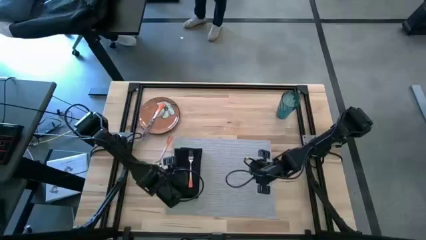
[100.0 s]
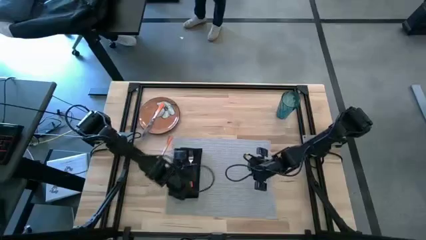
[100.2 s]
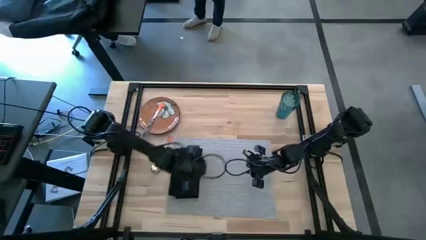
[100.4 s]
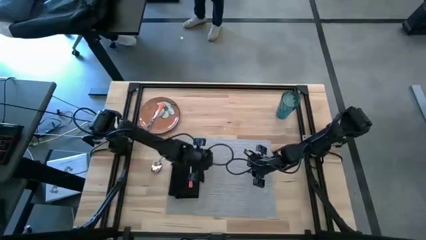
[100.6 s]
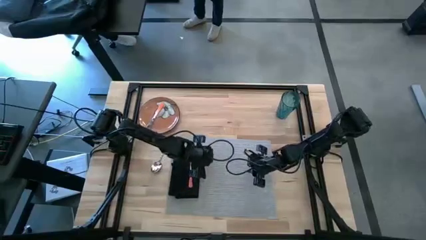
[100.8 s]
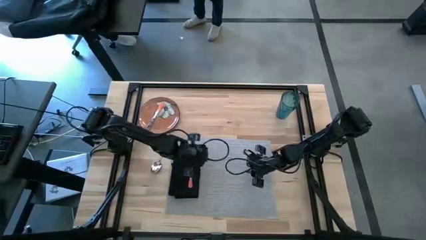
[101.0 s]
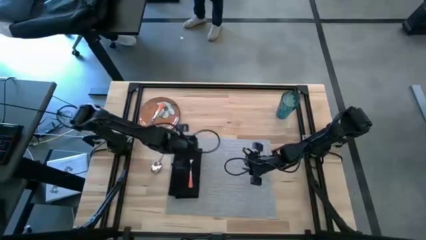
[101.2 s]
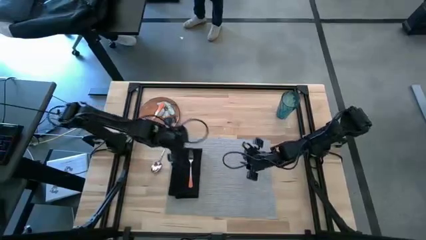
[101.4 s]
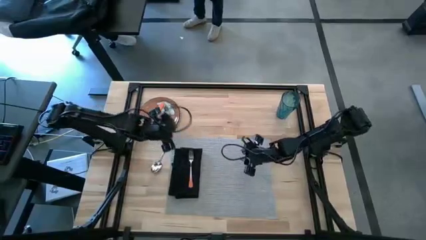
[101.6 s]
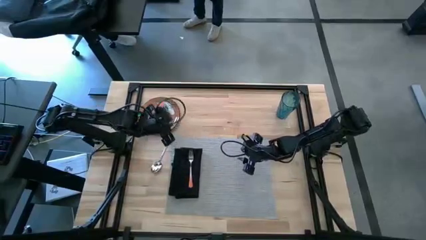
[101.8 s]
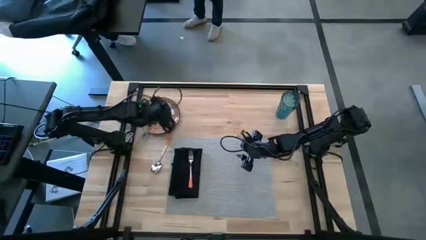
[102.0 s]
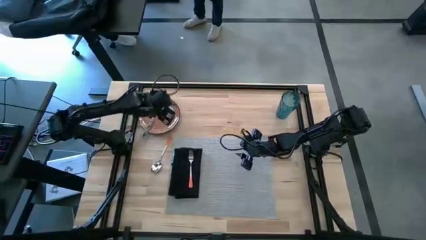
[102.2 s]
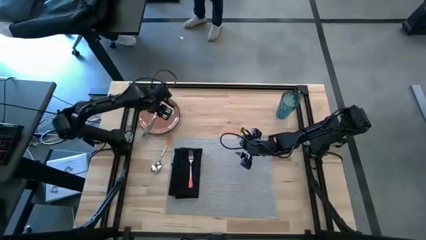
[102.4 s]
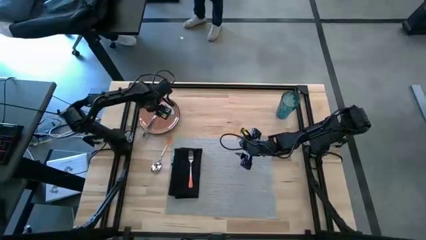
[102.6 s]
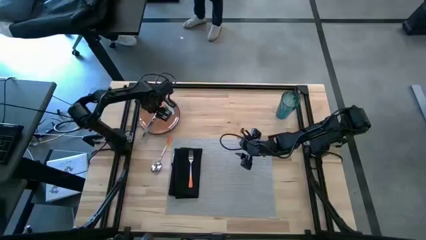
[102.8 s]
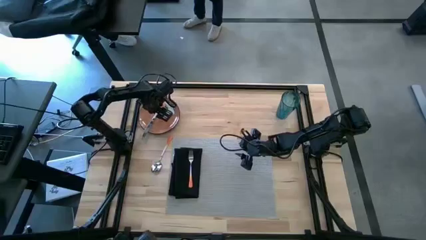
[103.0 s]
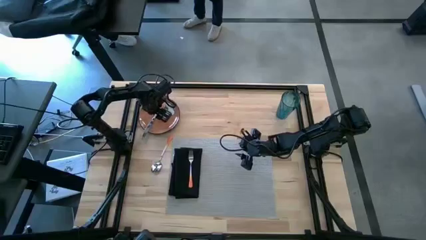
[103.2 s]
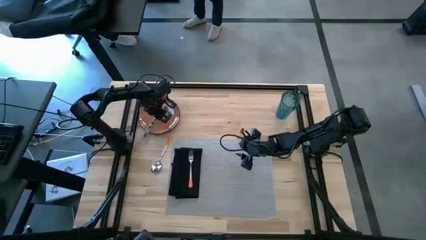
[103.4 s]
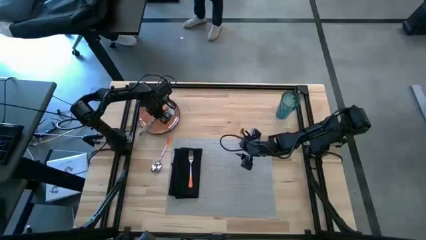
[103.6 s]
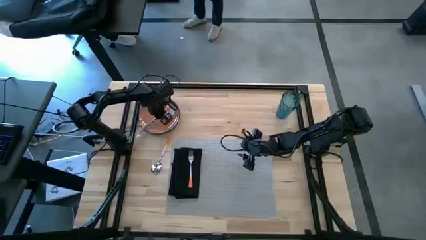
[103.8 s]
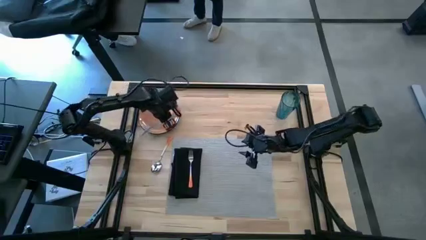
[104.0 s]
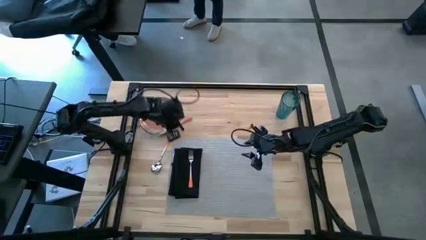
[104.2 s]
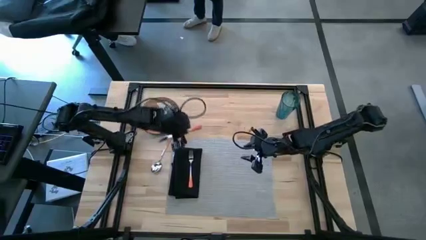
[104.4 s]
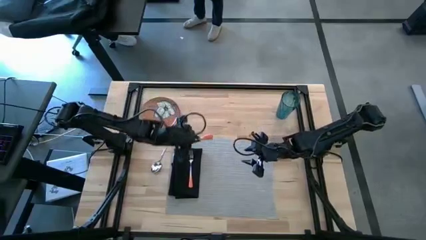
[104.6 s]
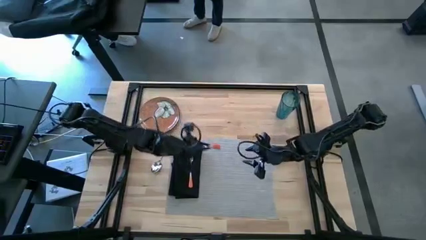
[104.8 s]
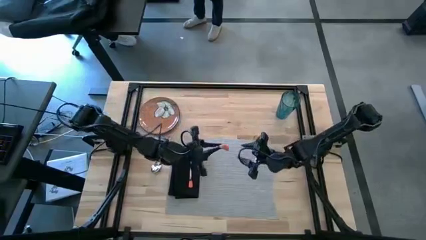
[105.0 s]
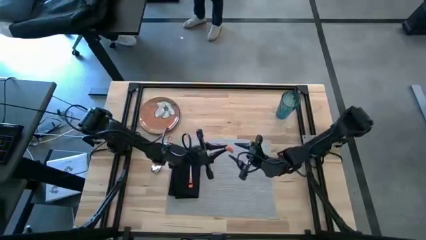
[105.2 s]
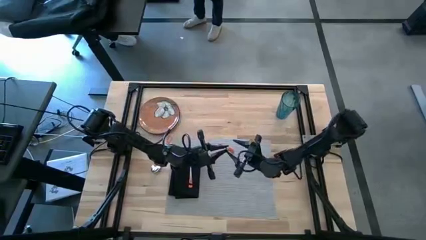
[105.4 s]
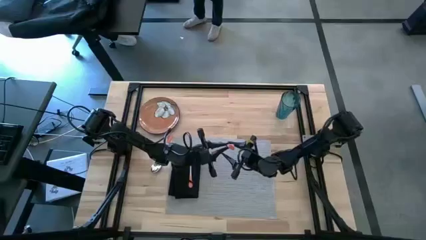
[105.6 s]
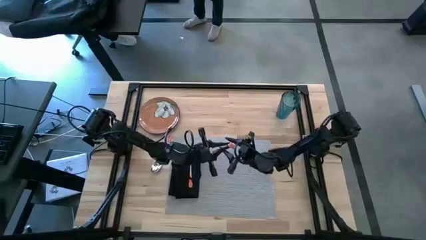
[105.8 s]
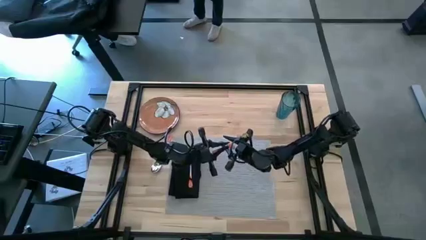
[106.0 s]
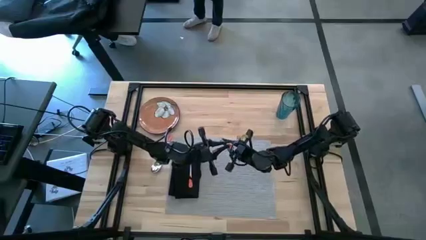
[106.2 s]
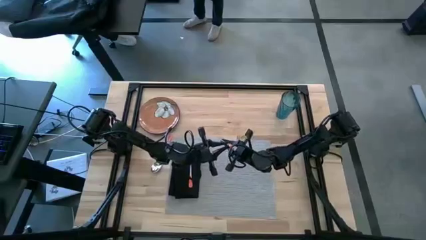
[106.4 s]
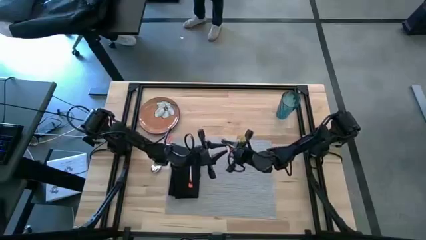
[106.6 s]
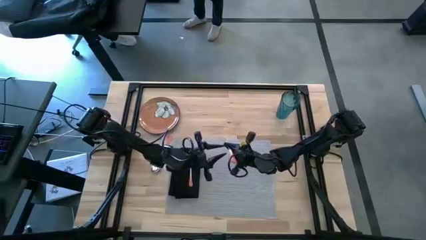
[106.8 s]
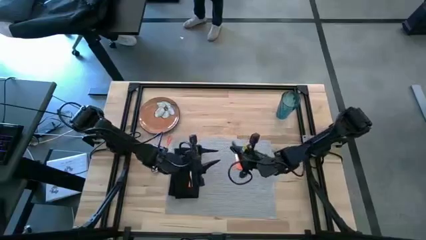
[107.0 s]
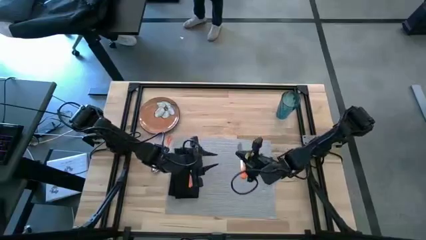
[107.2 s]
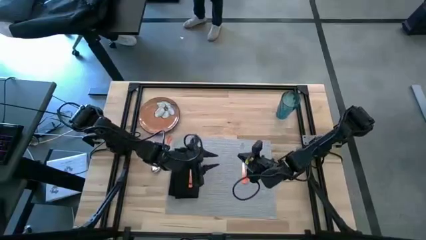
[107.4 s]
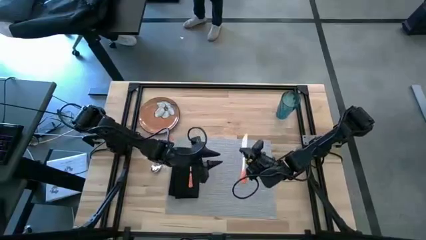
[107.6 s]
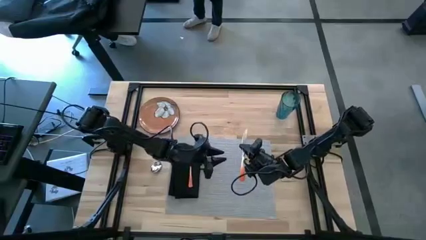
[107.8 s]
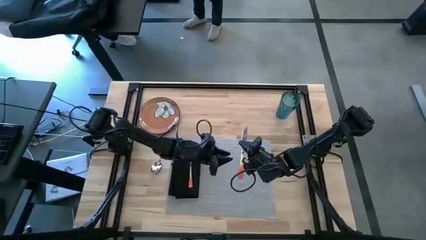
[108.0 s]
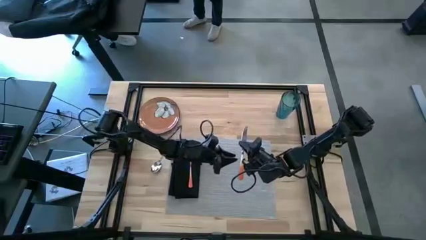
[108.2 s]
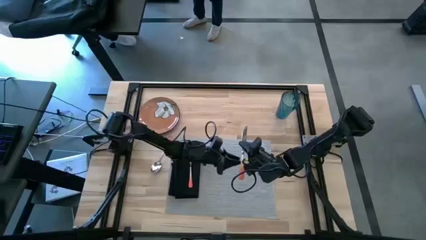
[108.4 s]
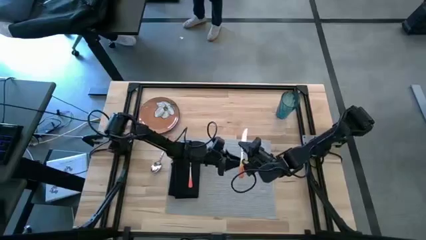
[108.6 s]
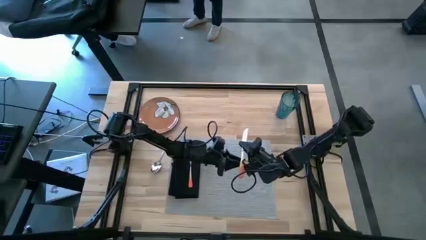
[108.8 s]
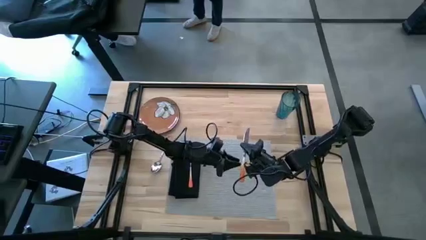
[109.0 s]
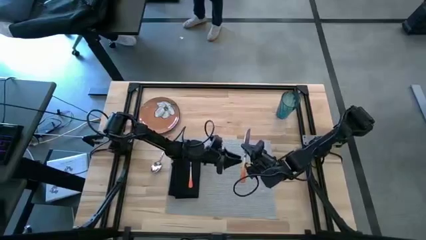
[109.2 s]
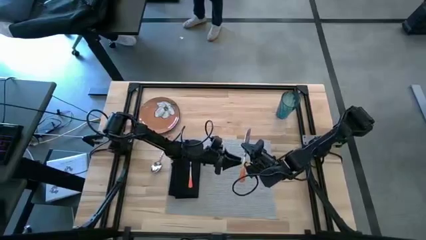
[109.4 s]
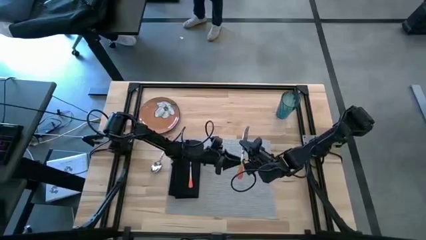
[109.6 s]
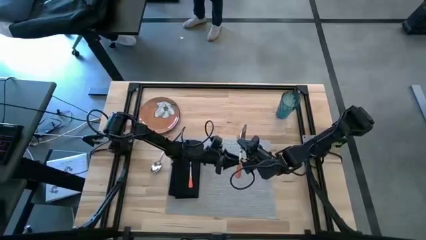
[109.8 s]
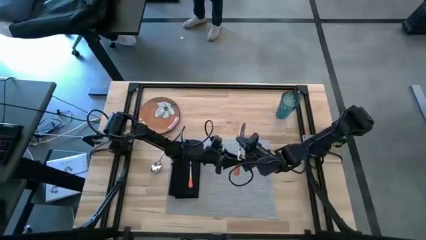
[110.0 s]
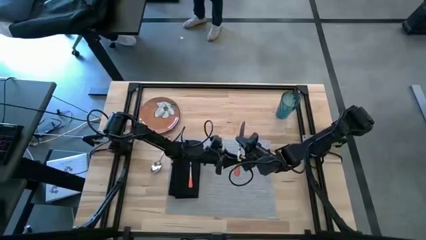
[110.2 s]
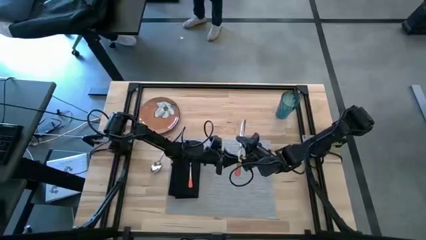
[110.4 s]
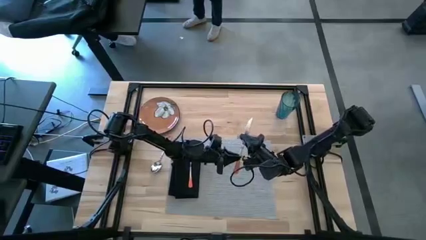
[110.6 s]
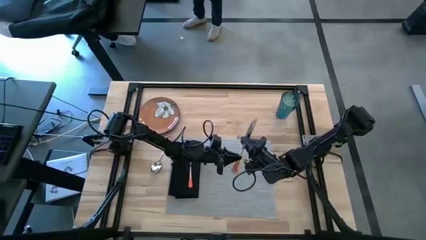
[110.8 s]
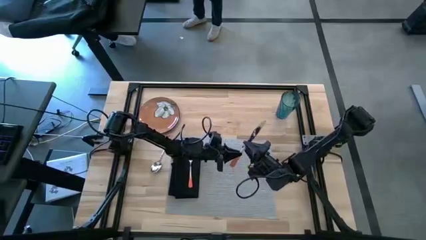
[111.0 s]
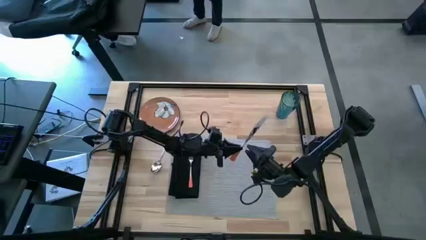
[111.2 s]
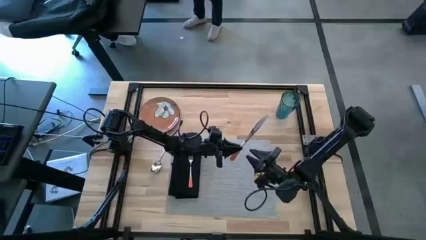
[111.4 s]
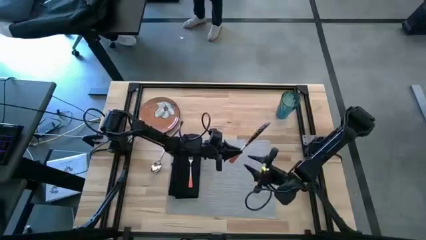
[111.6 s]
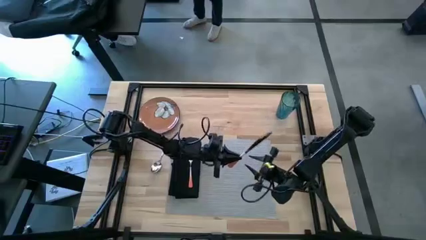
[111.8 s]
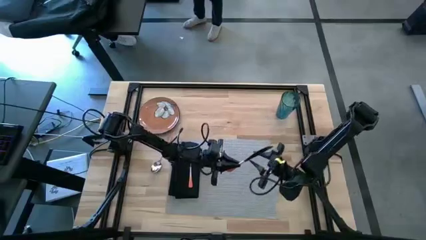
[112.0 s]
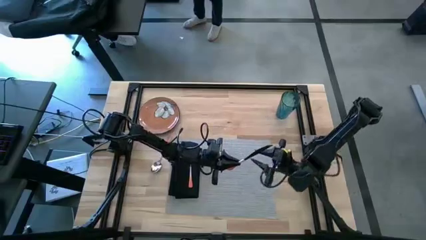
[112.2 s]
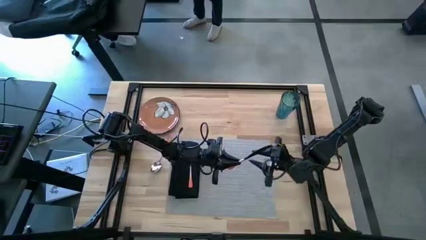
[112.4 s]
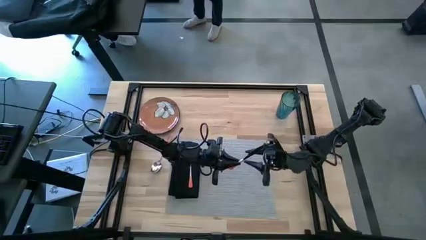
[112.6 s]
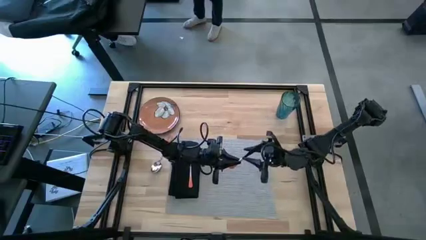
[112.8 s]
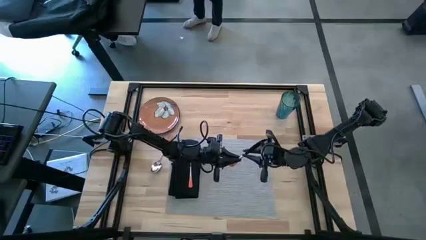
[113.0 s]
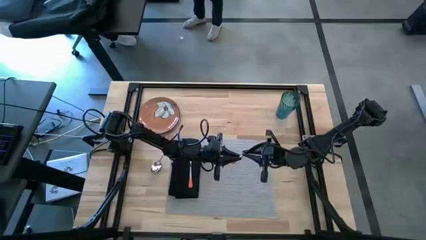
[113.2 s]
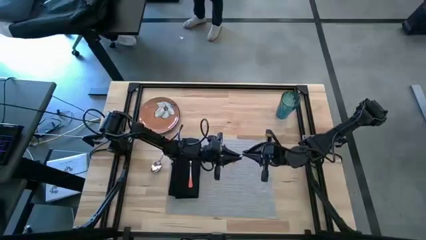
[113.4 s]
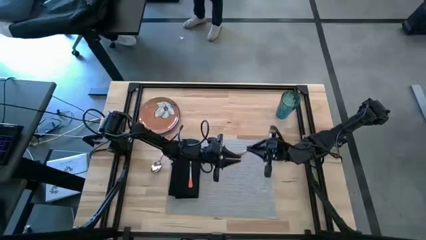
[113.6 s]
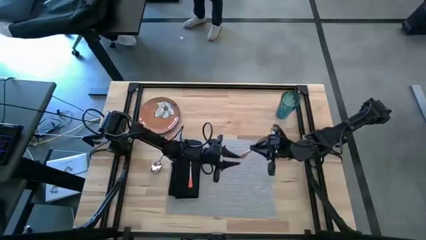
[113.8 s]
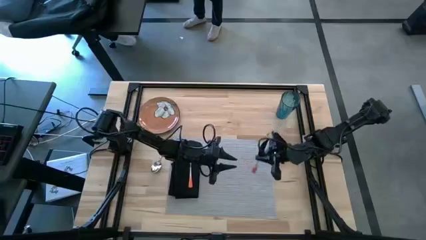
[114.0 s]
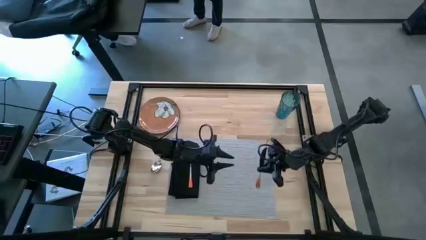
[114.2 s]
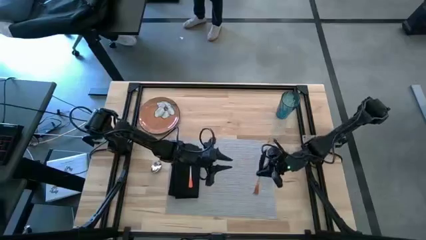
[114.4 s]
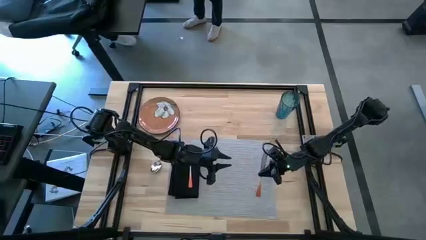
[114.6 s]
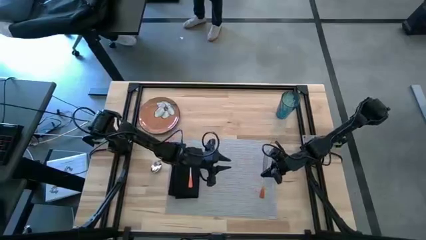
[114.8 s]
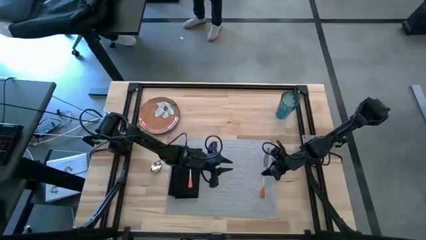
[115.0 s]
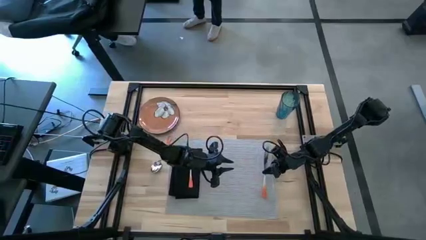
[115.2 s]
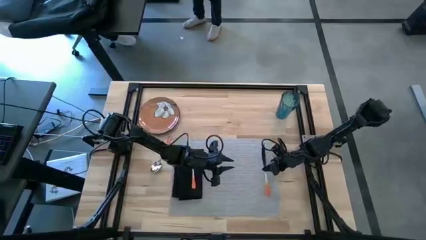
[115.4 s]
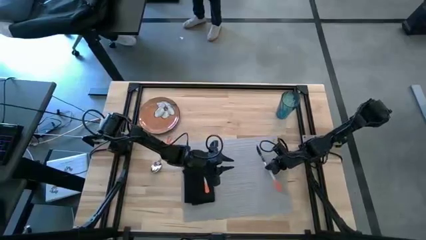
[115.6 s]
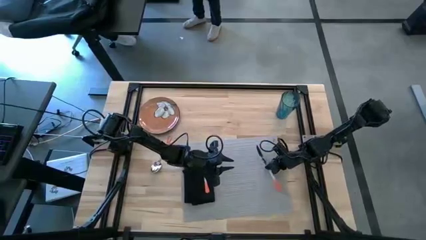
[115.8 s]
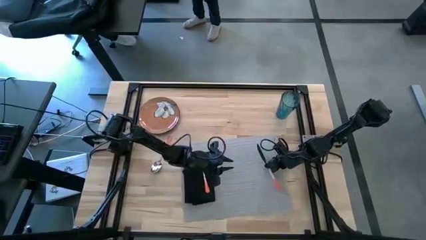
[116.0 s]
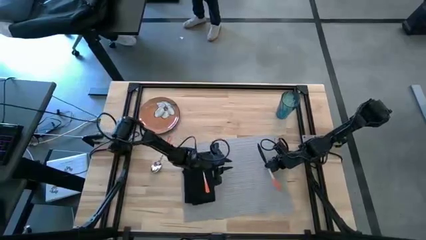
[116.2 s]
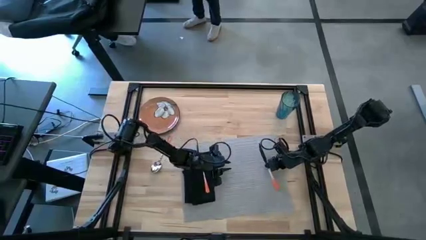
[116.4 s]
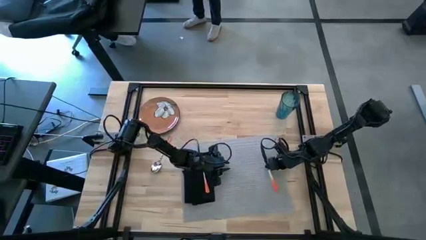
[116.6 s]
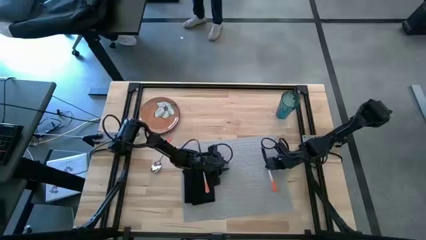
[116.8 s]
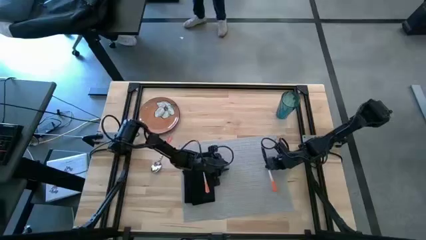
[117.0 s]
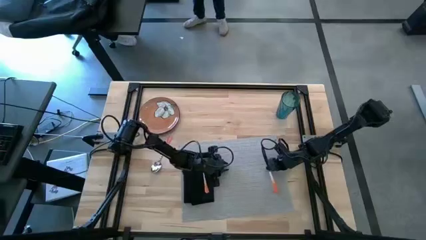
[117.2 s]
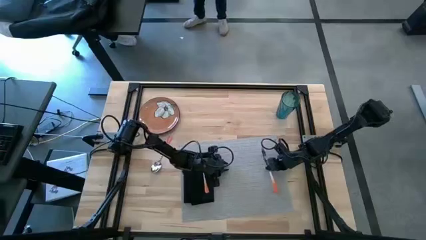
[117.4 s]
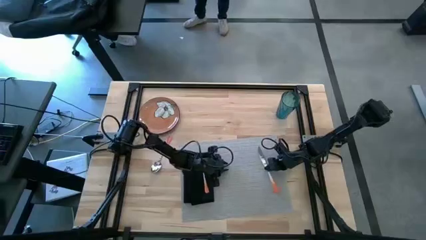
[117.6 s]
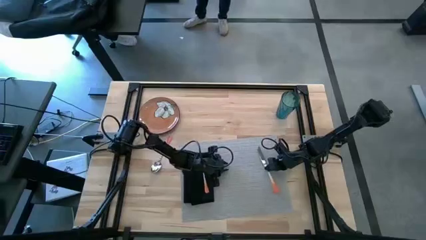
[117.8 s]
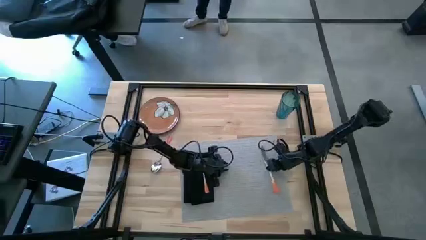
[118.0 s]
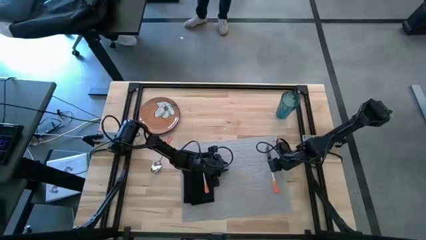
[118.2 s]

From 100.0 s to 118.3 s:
Task: Set table place
Put the orange knife on the gray placemat
